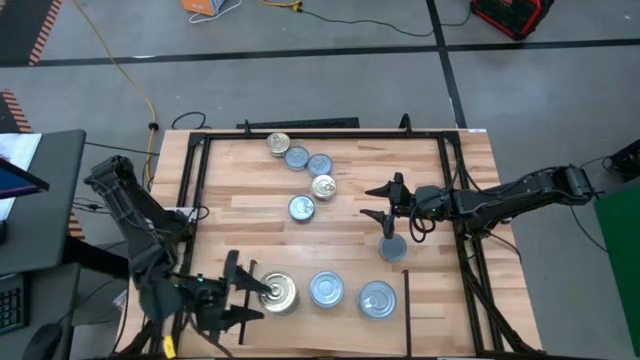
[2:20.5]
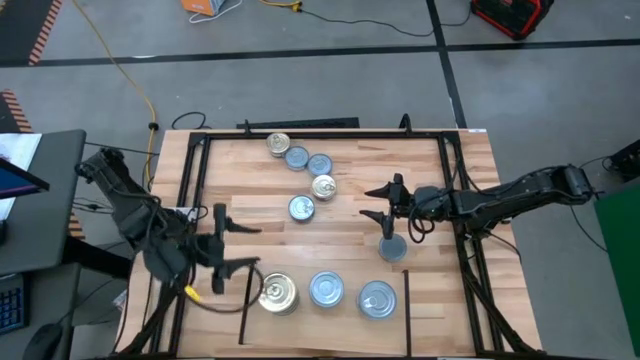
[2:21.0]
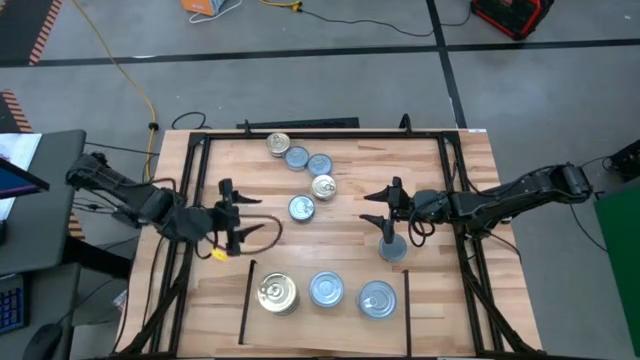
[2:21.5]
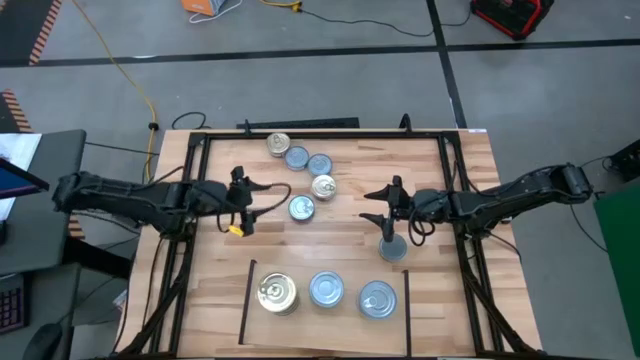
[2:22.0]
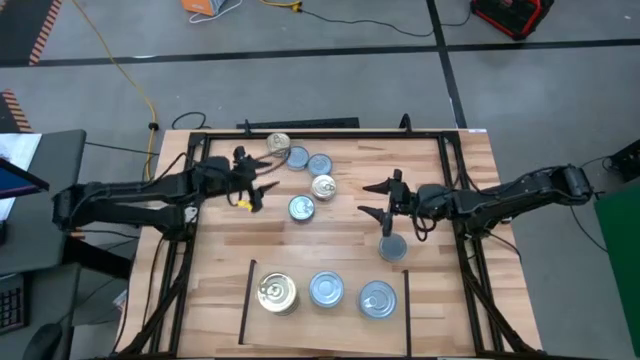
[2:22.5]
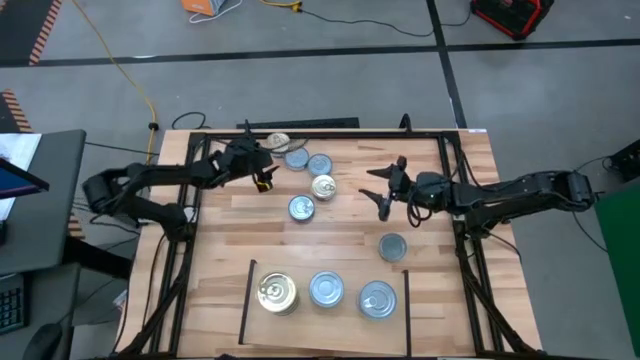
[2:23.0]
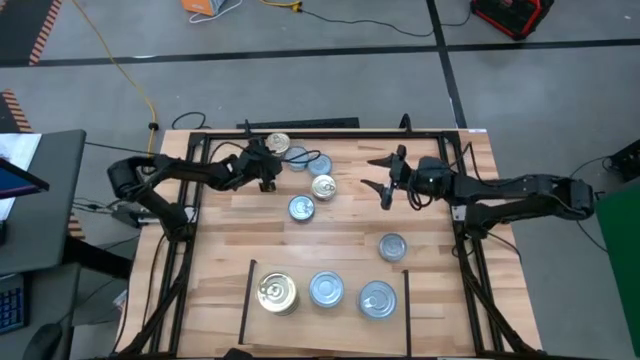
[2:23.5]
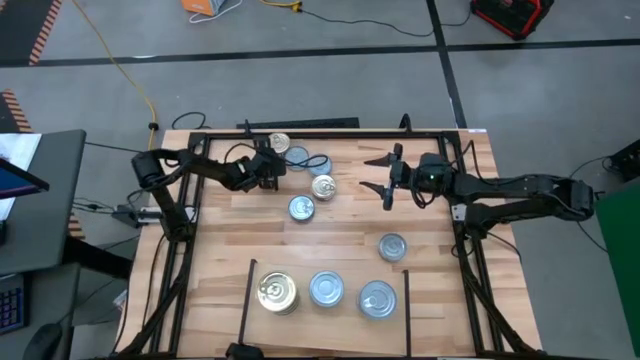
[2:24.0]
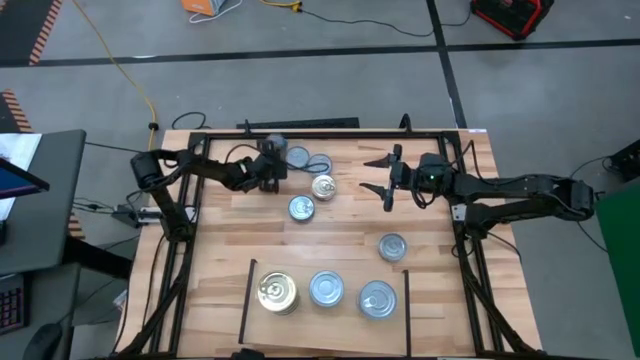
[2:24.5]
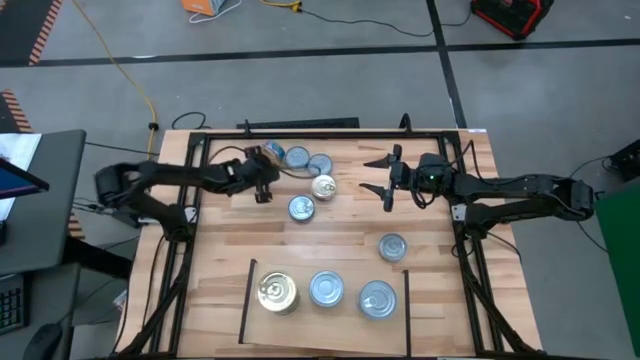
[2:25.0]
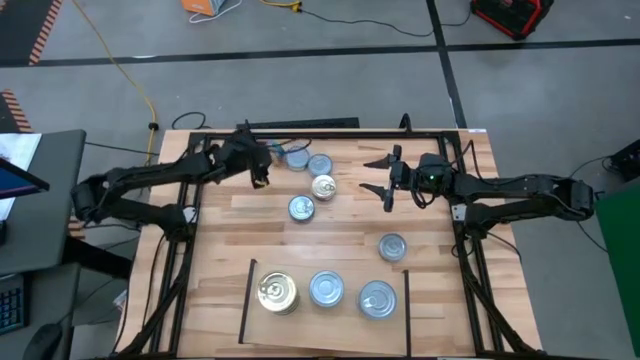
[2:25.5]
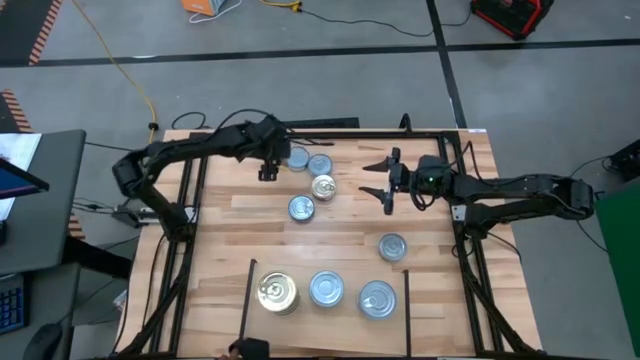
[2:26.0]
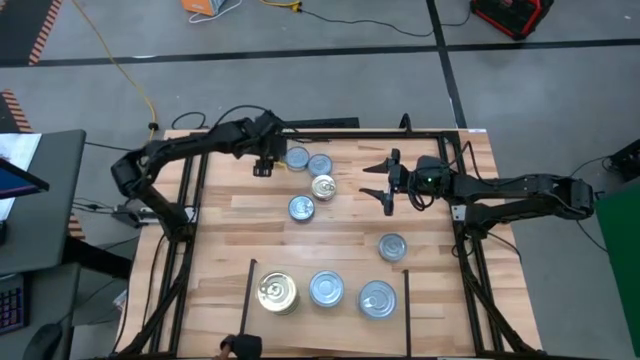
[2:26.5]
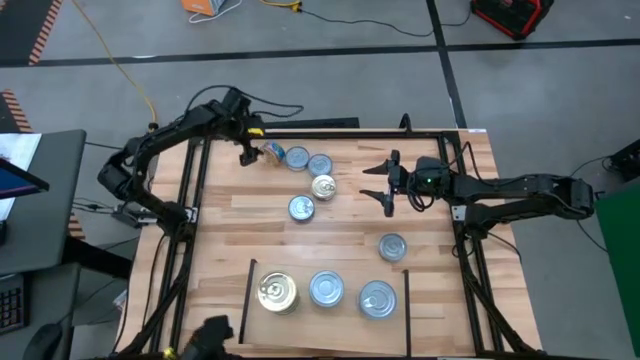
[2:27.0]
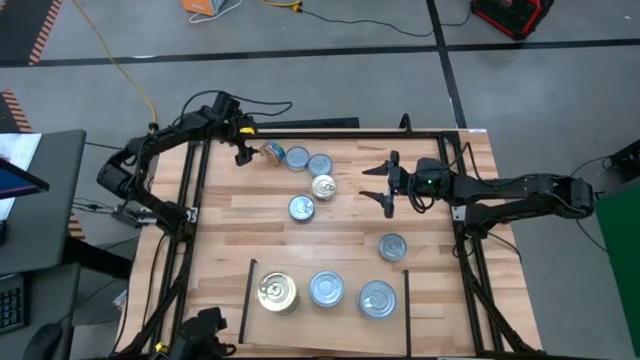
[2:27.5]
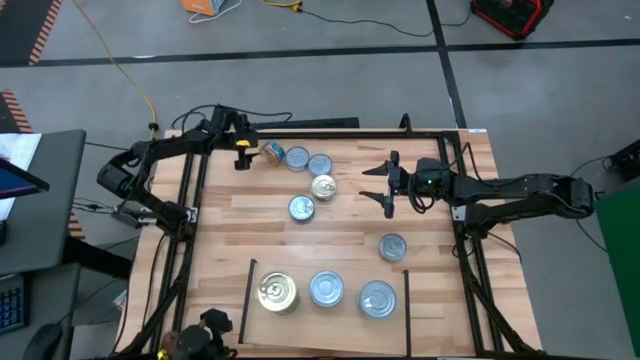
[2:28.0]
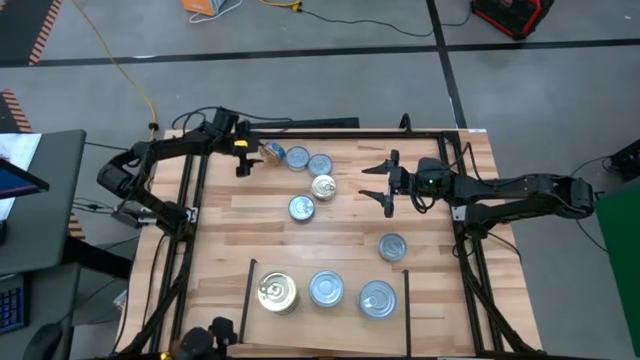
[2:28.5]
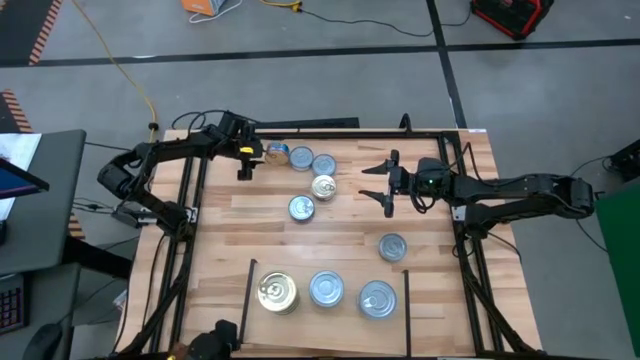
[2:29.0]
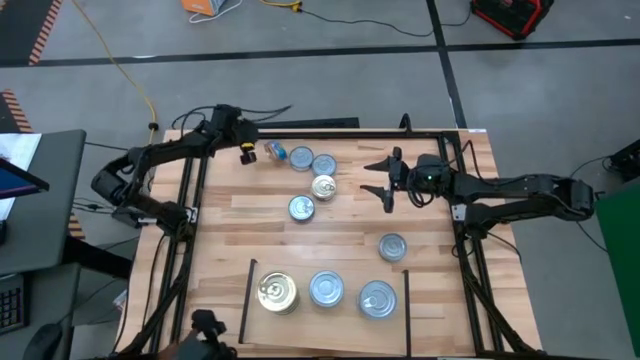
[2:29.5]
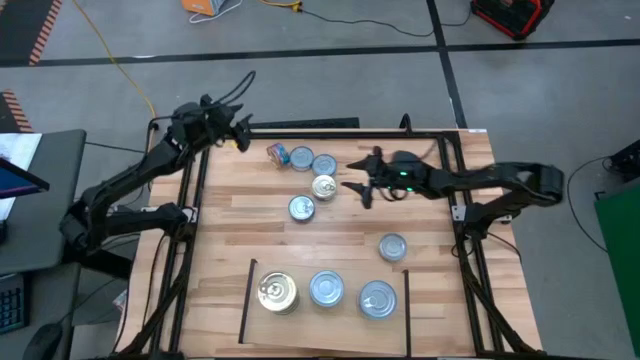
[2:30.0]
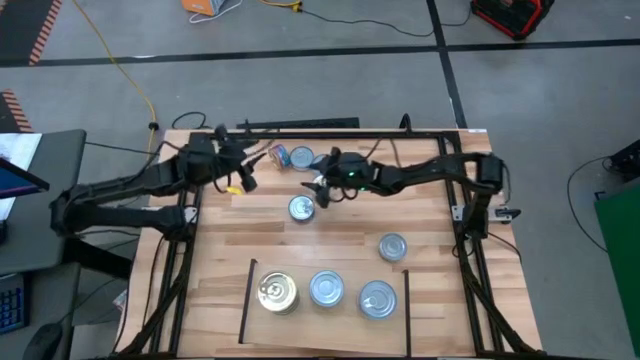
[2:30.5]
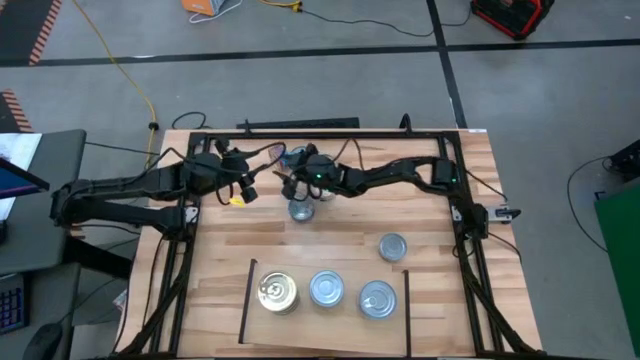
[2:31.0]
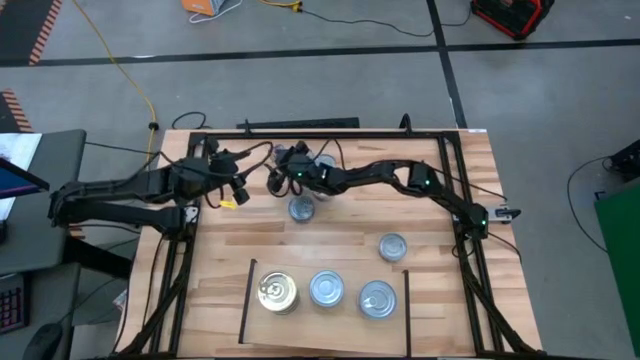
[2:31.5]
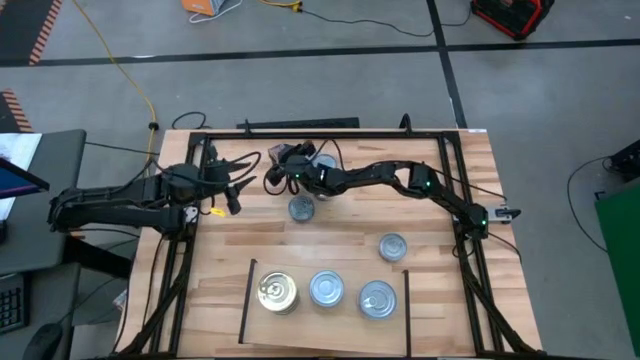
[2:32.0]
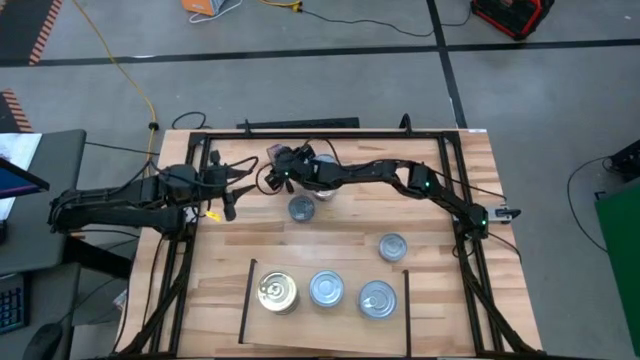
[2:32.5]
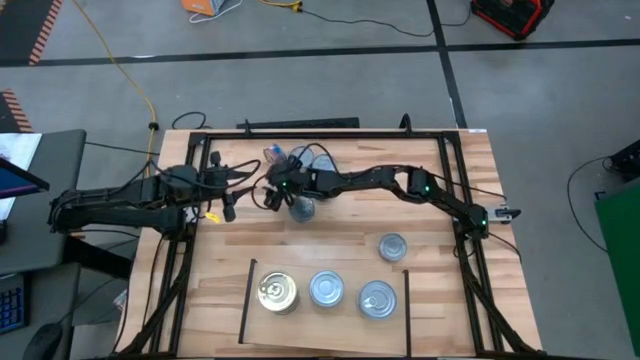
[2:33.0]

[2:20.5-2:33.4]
Task: Stack canned seafood by type on shelf
Put the top blue and pink tuna can on the top of the left stacked tuna cans on the shelf

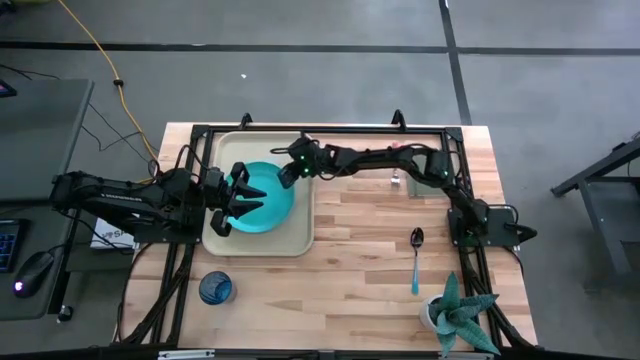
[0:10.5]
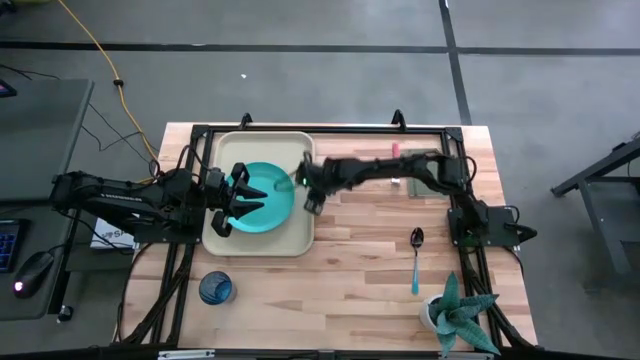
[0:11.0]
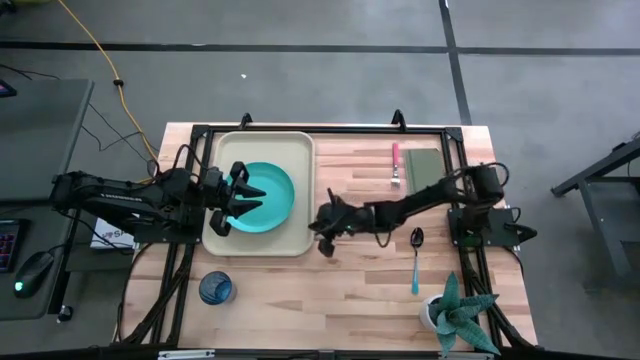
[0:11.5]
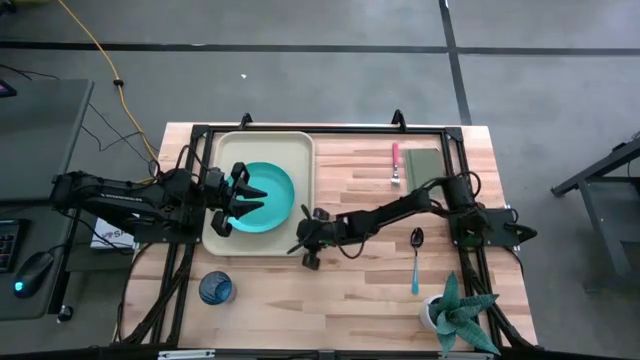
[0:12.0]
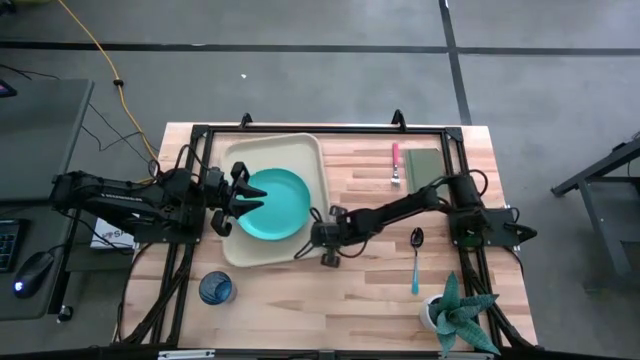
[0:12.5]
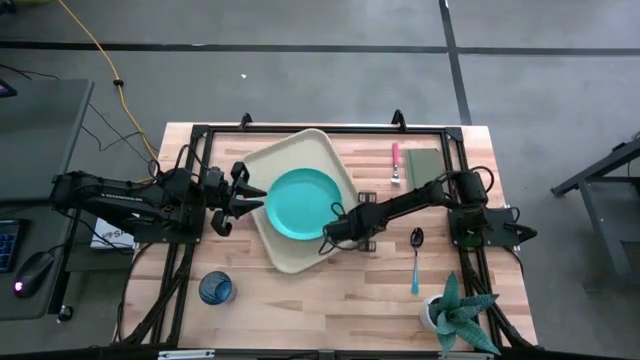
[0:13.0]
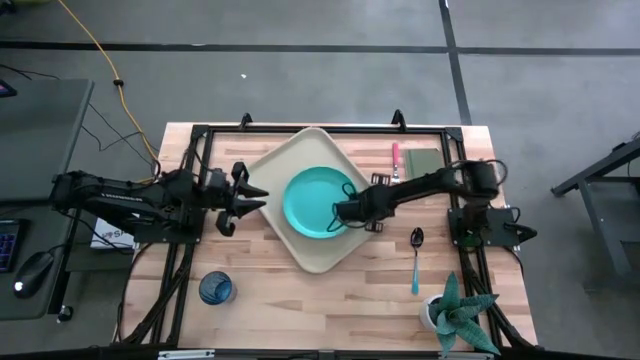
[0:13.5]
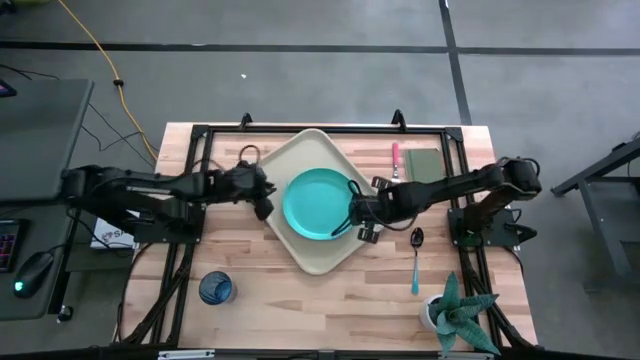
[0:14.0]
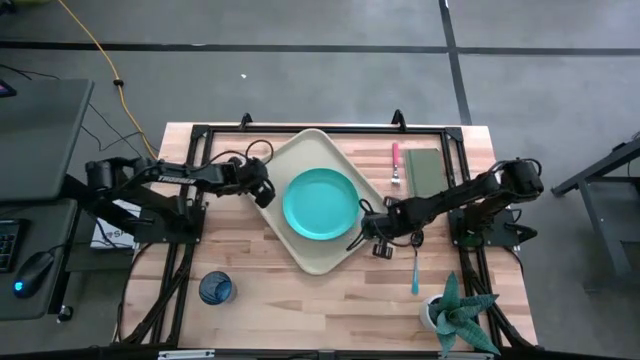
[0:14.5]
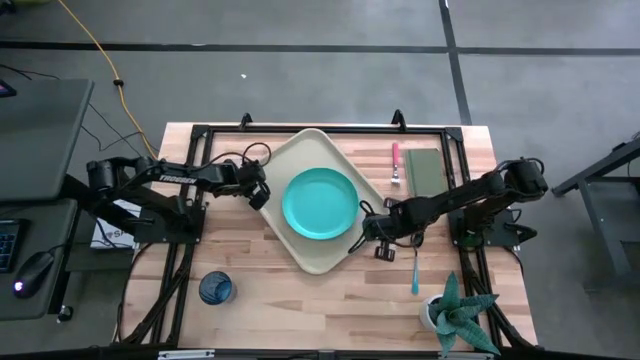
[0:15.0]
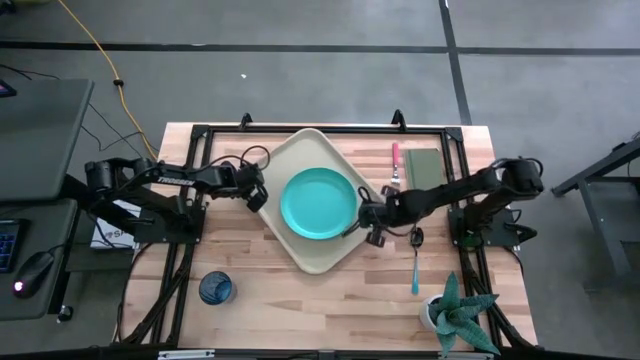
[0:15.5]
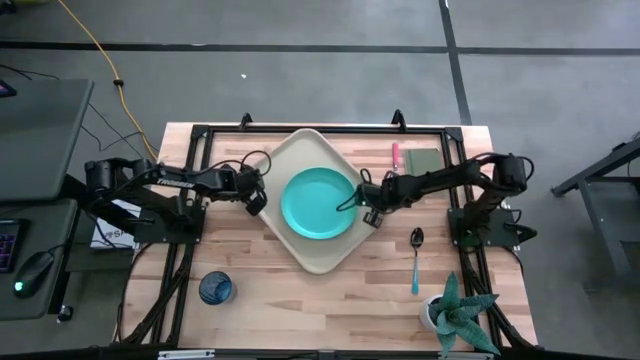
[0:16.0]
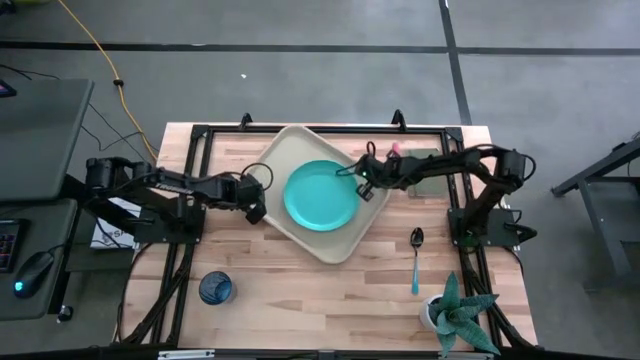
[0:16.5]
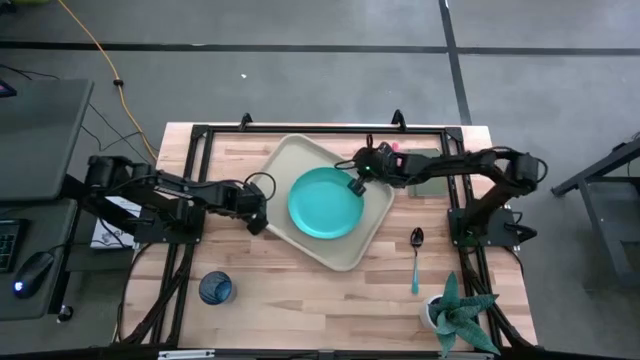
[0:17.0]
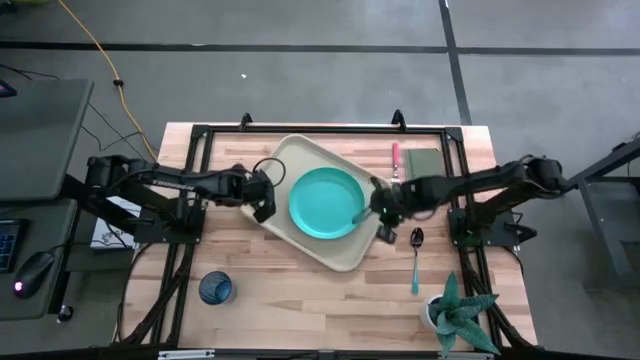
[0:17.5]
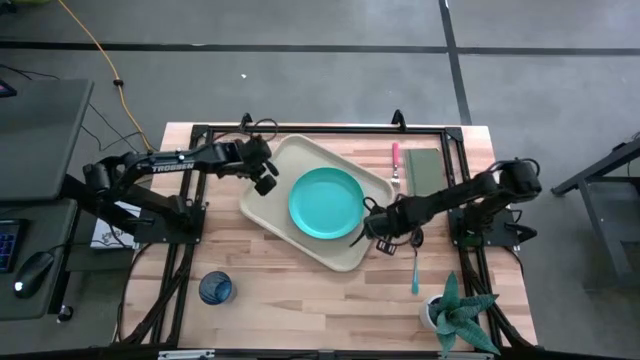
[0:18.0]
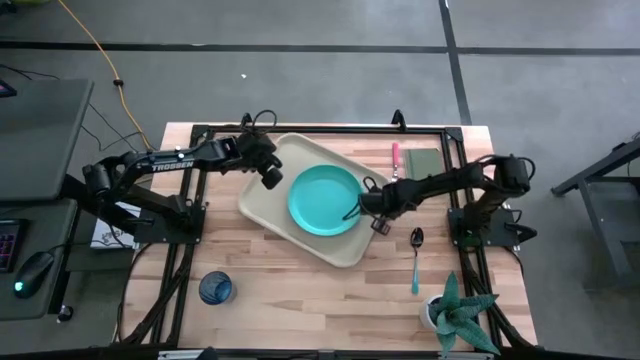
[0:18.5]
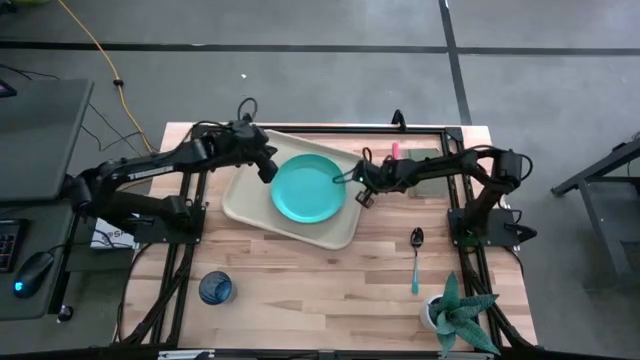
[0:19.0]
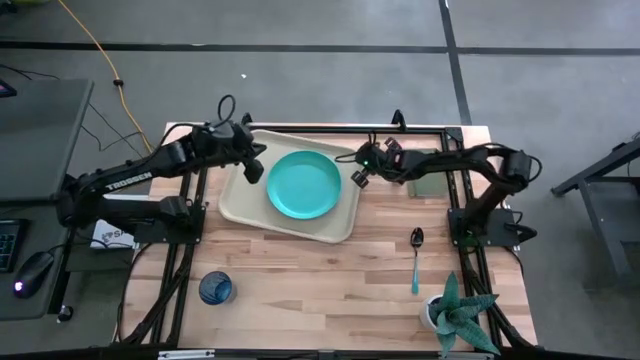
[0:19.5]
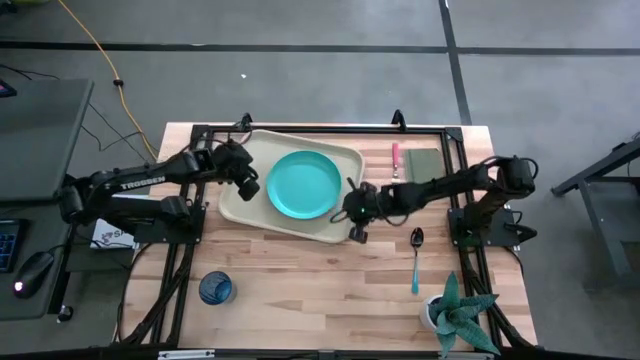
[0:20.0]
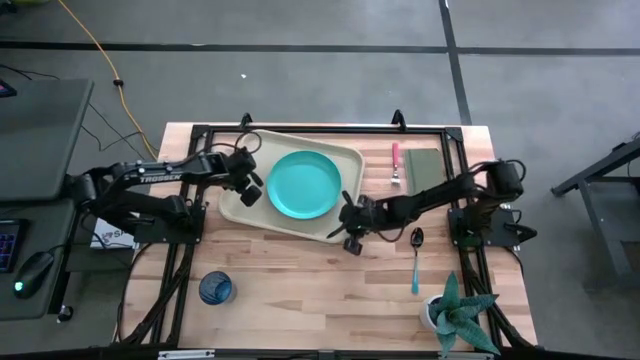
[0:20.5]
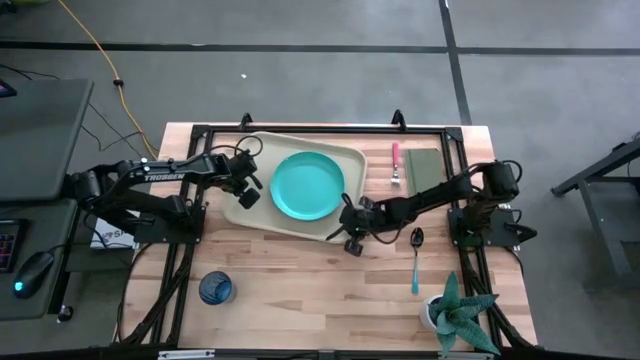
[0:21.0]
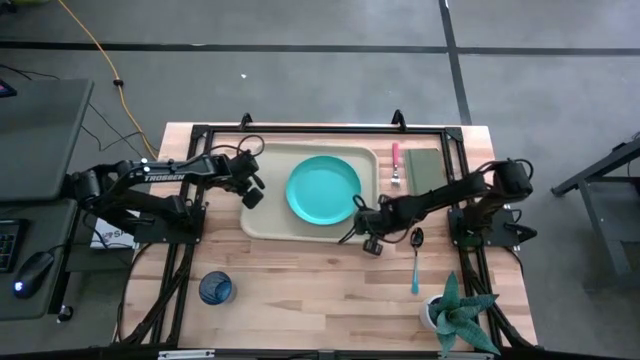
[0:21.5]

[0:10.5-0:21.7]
Task: Pick and place plate/cup/fork/spoon on tray
Adjust the light brown tray
